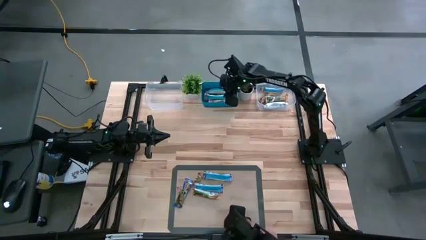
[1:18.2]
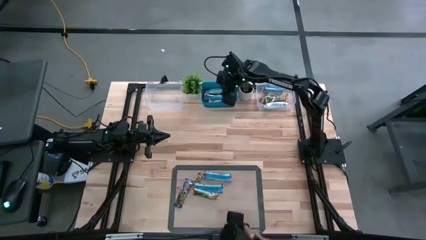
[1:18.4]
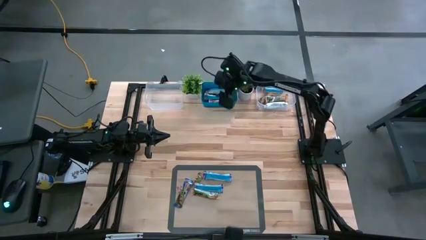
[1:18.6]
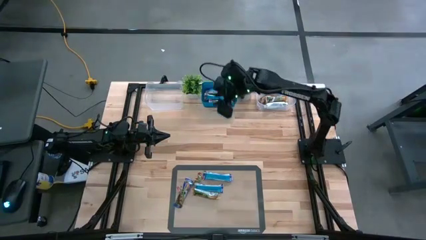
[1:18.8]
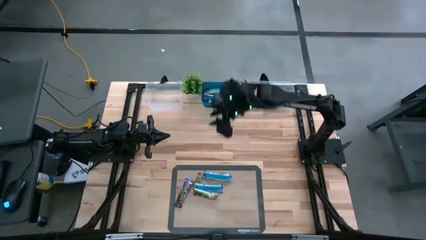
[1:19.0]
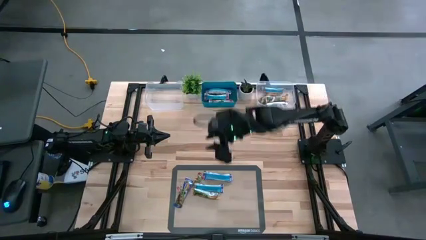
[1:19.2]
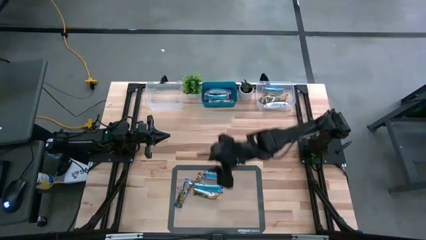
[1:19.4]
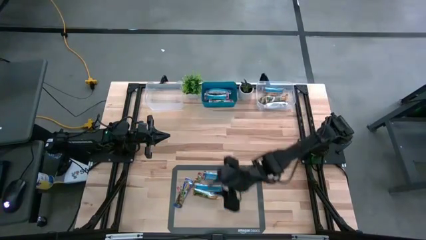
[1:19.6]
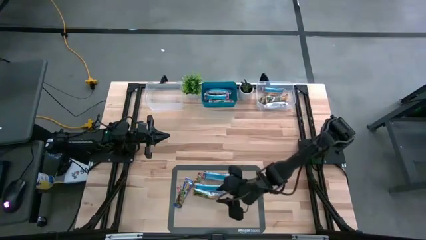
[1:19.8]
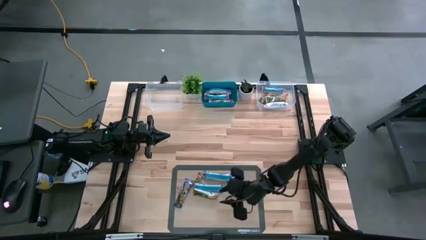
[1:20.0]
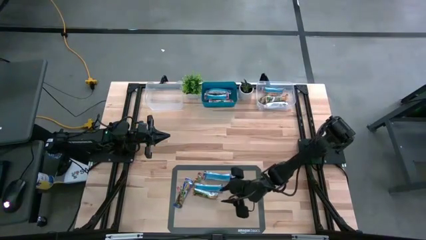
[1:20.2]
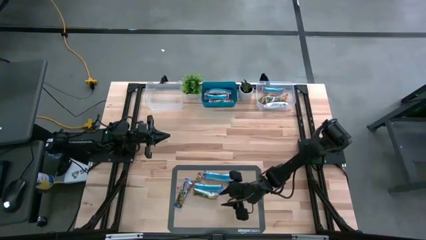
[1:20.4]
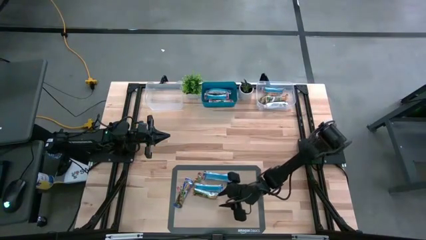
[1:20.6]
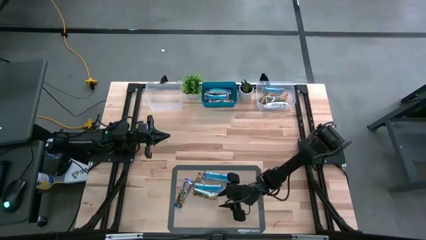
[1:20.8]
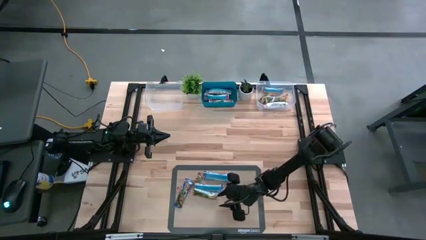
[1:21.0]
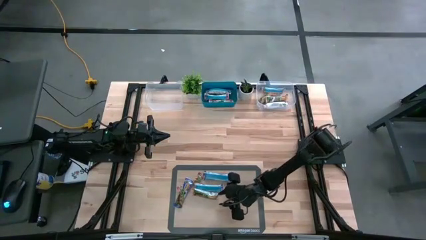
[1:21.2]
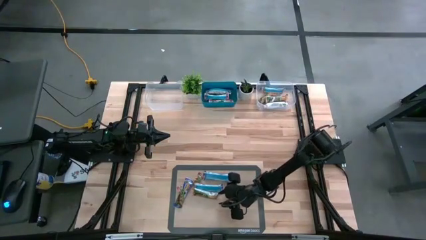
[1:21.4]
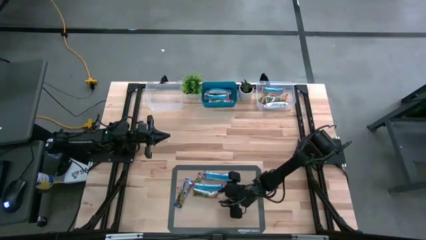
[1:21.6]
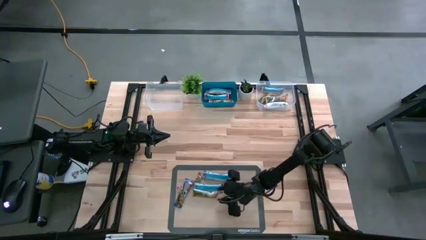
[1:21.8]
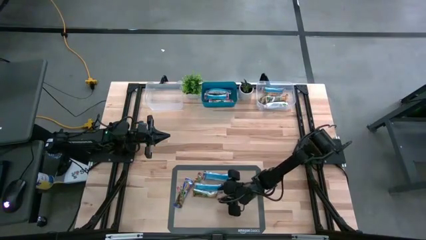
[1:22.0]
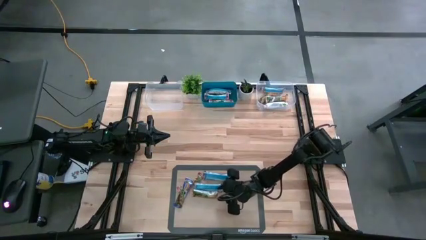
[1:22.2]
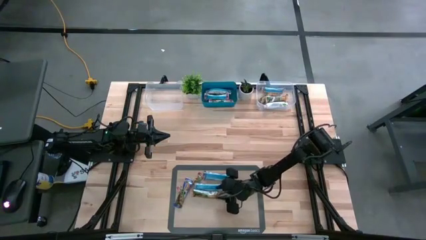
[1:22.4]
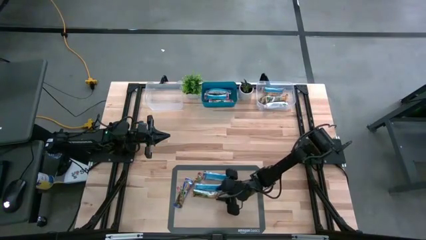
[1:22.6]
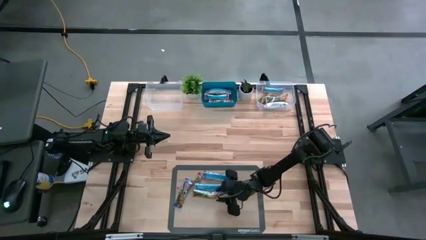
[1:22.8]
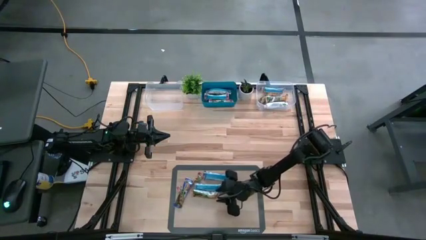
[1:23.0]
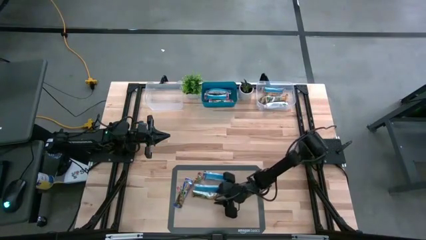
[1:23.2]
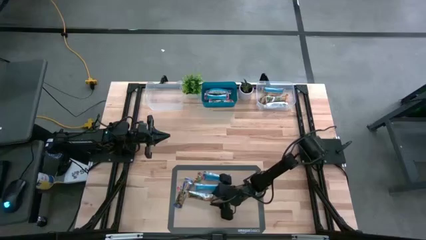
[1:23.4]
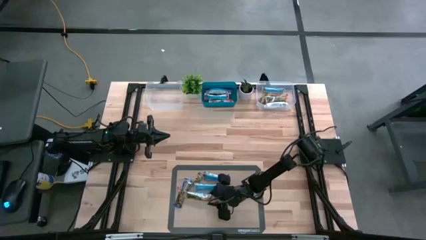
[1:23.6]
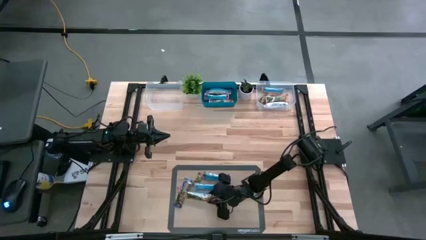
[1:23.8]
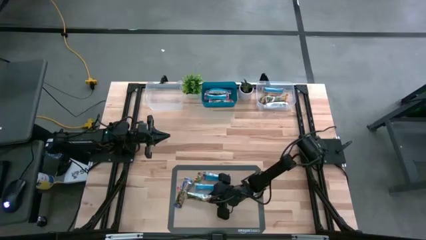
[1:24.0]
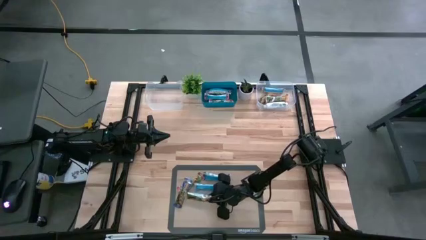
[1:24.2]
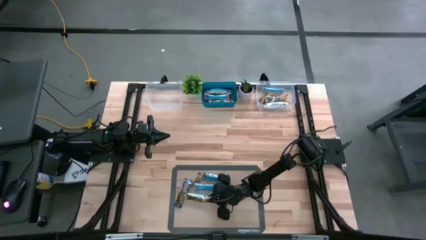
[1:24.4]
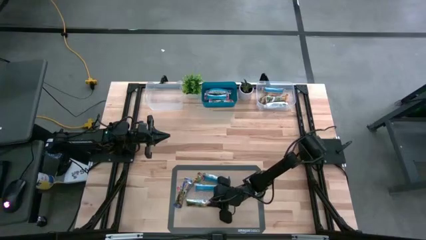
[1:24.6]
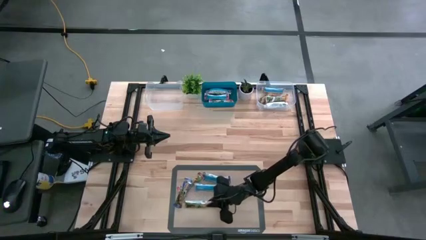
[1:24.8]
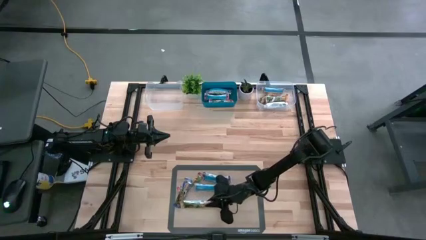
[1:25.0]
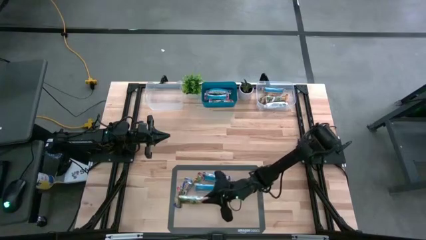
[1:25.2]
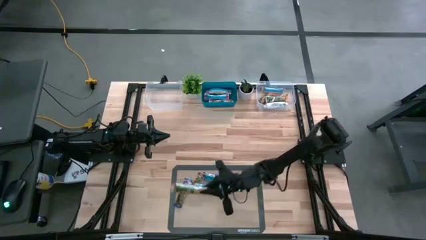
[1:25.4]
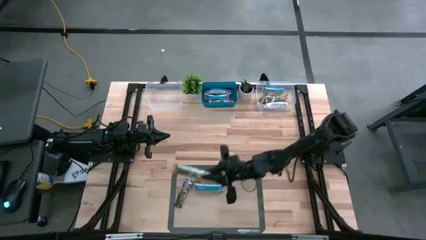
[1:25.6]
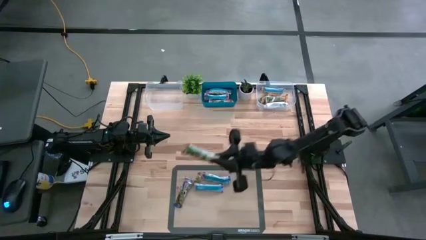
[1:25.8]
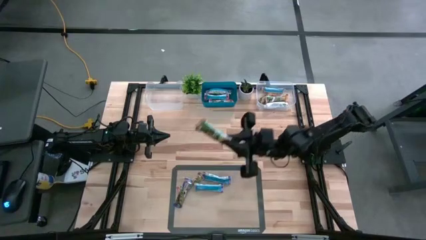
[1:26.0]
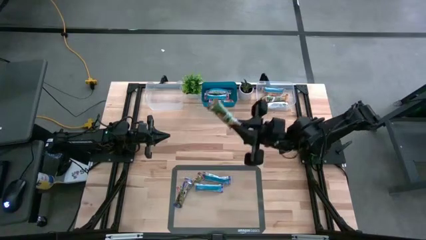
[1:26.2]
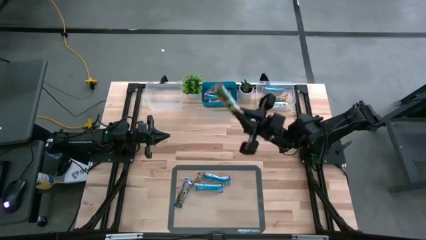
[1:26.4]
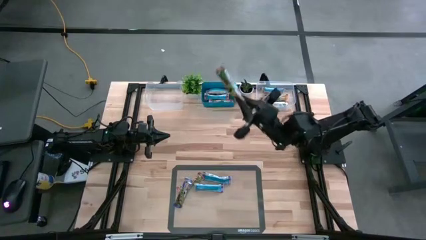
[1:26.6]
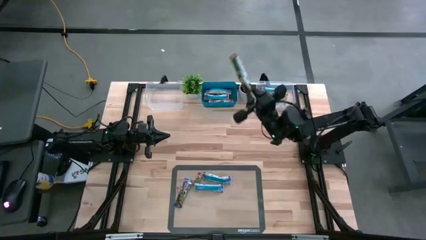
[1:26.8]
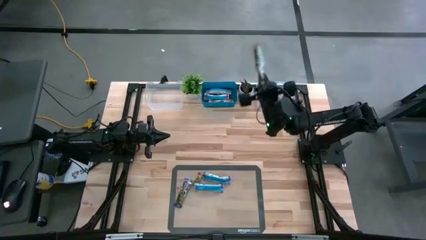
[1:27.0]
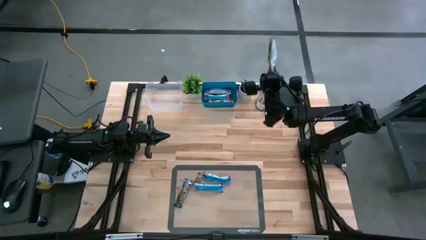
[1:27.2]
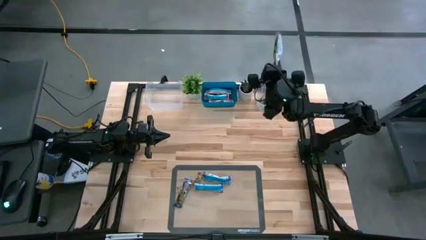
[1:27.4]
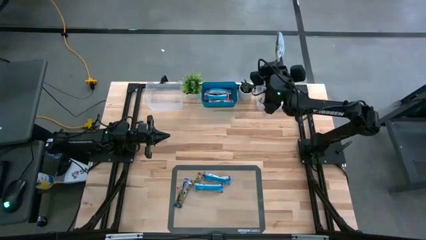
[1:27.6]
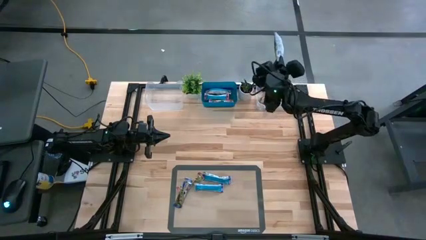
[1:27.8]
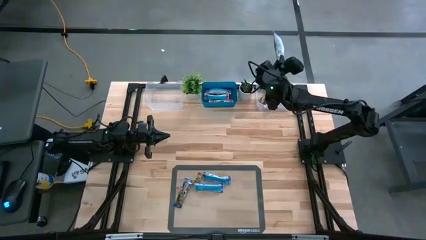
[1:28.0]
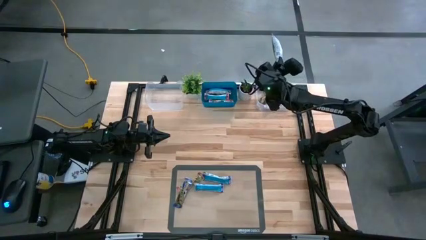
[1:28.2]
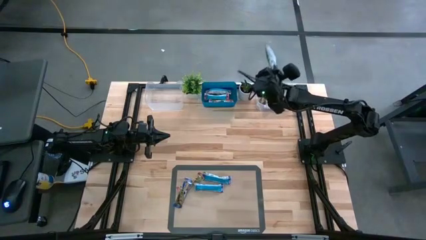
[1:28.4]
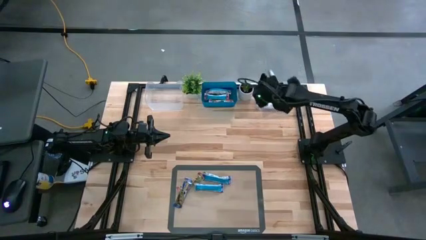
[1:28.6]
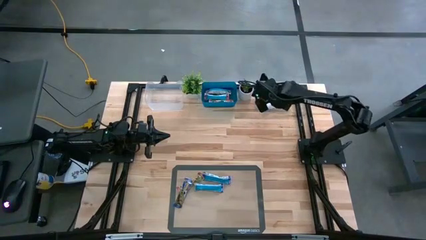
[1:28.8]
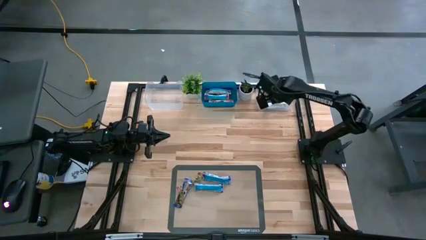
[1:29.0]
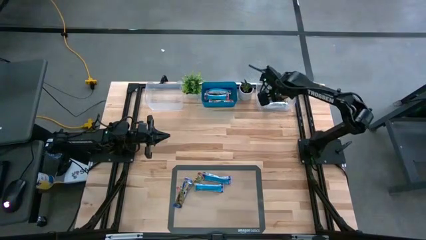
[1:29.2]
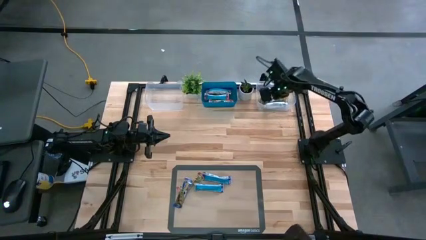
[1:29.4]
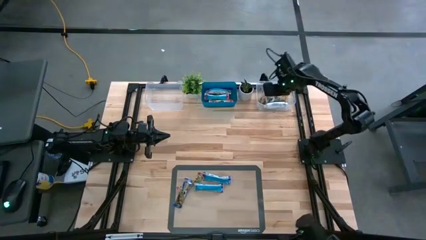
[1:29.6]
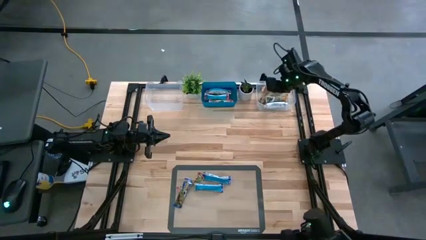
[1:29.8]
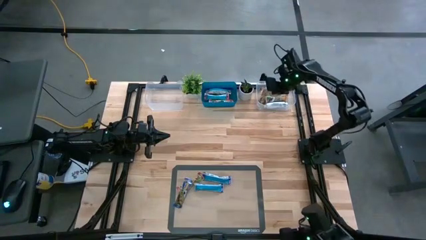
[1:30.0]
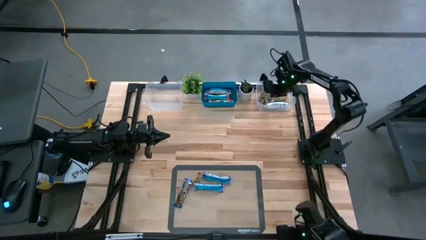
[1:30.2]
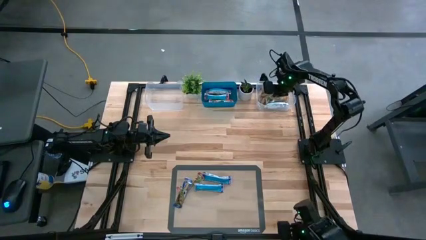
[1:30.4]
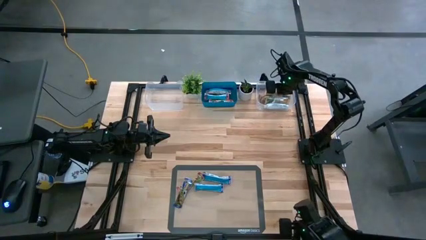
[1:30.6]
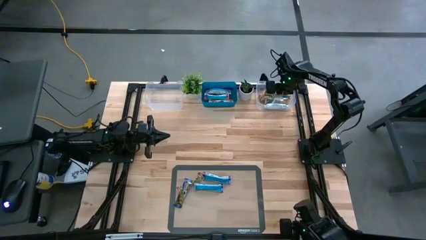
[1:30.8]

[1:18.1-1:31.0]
Task: Pick and place Granola Bars by type
Put the yellow granola bar into the right transparent bin

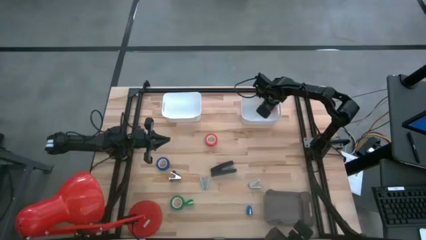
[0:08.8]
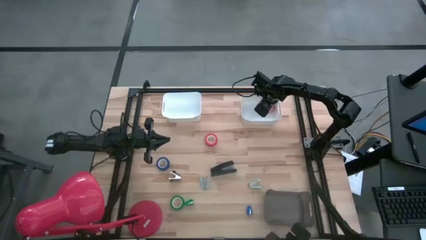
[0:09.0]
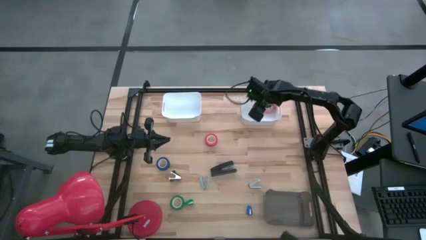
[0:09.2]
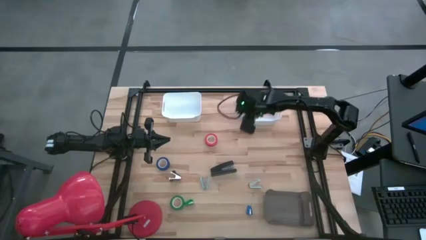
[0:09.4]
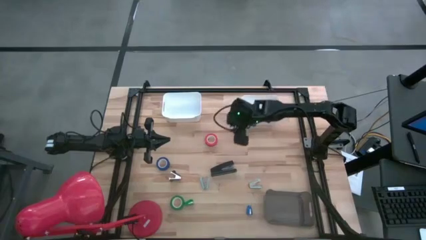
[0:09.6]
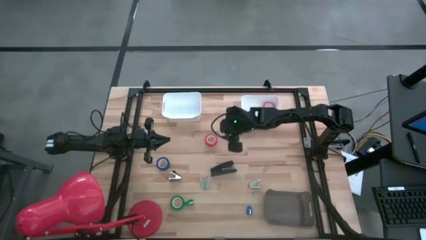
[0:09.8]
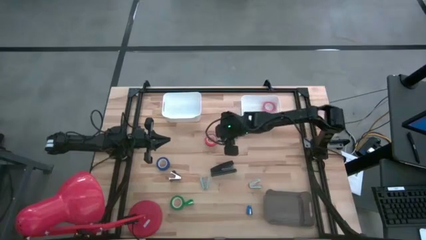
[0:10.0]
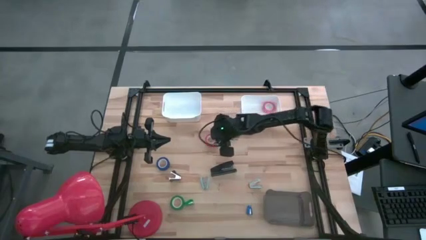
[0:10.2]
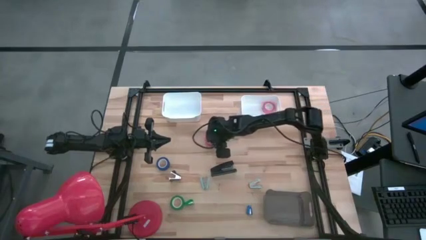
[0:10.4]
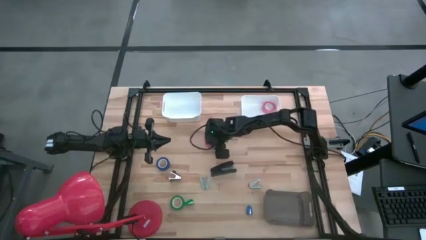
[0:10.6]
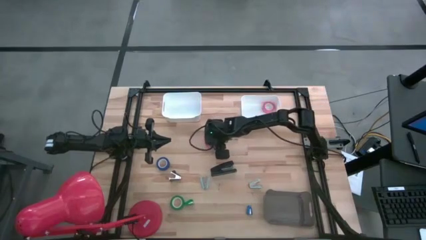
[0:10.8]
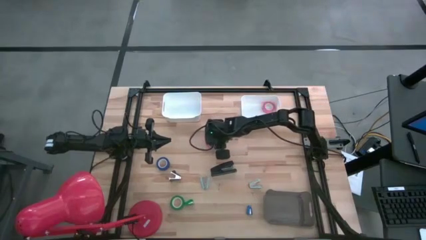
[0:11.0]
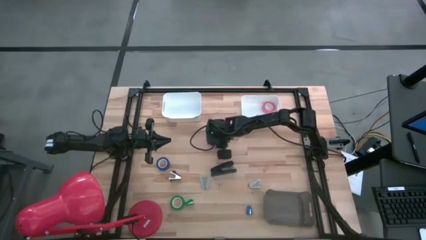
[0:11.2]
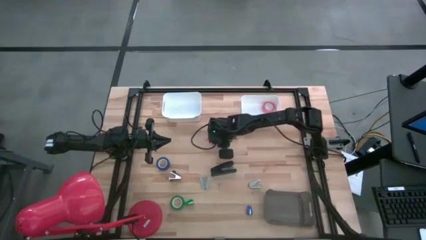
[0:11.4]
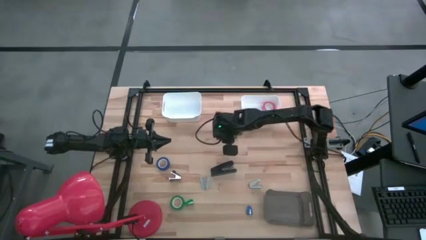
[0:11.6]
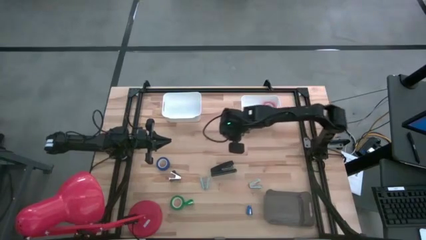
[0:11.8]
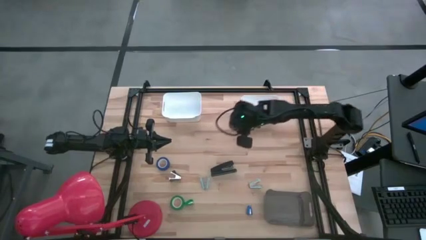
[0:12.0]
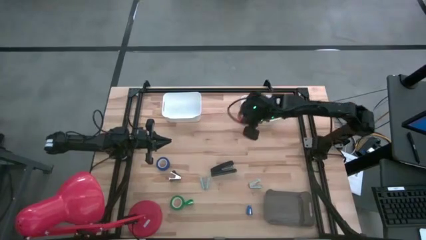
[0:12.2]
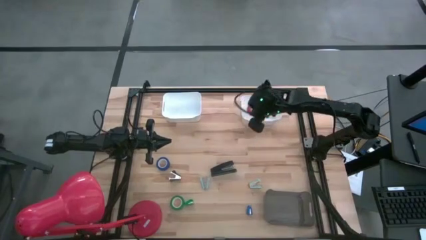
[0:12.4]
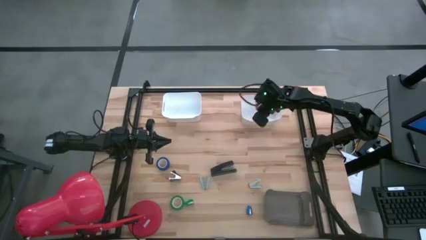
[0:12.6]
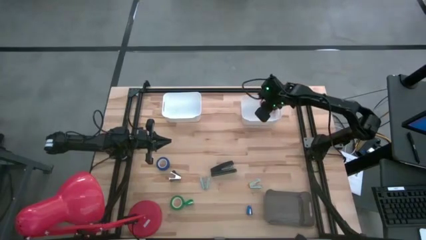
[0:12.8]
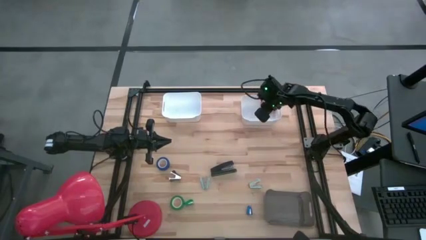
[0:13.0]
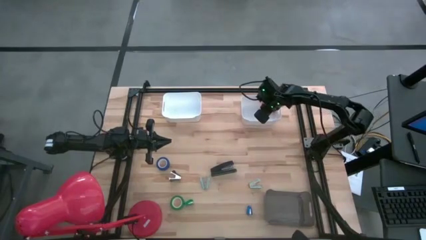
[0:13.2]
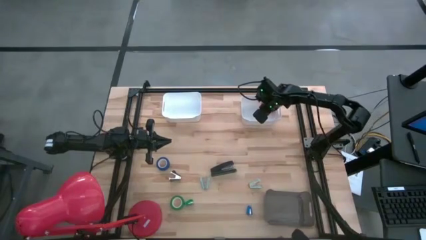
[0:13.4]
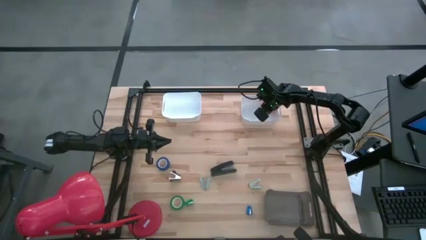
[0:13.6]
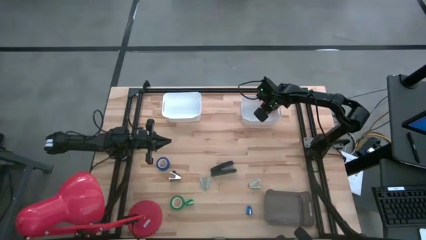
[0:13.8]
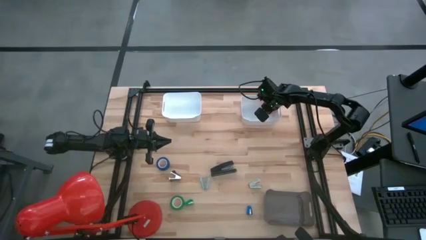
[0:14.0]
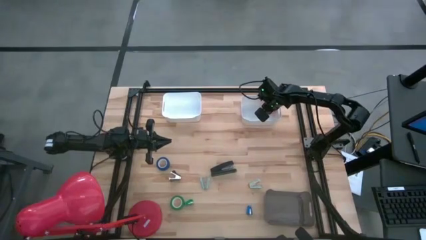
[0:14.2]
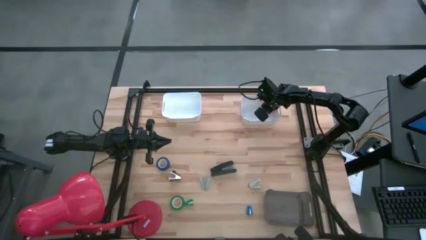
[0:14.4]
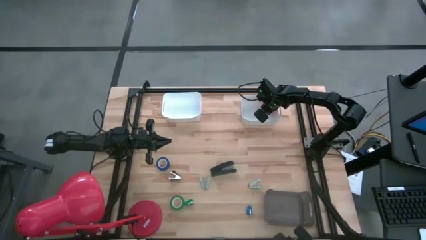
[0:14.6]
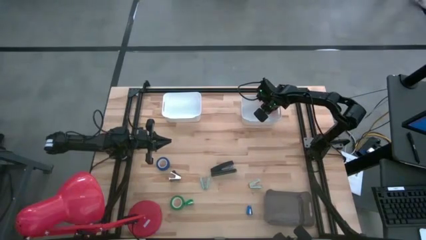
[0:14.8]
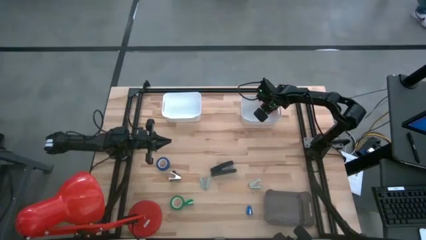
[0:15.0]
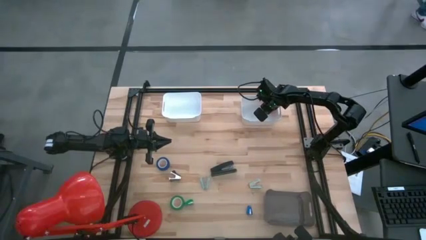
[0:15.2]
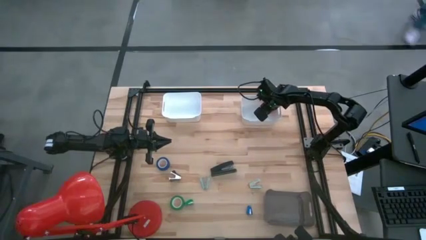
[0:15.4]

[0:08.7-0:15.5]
Task: Pick and place Stapler, Stapler remover, tape
Put the red tape into the right white bin
